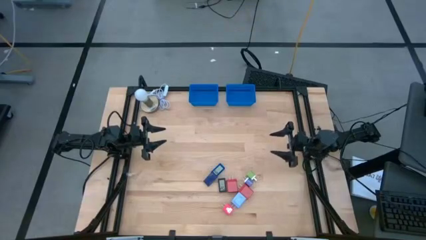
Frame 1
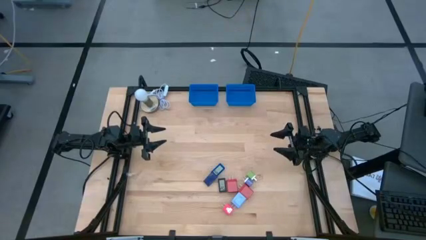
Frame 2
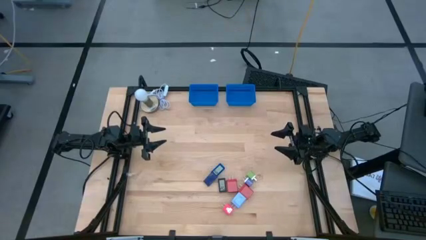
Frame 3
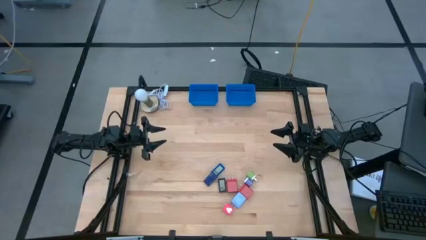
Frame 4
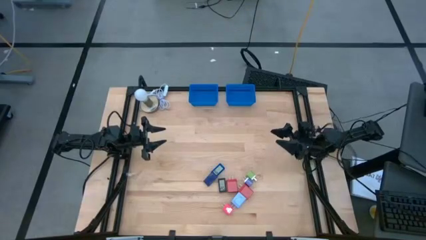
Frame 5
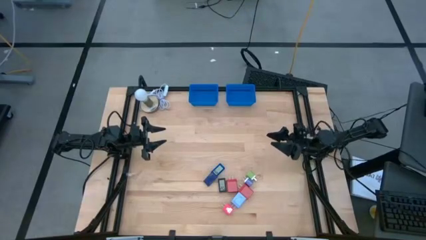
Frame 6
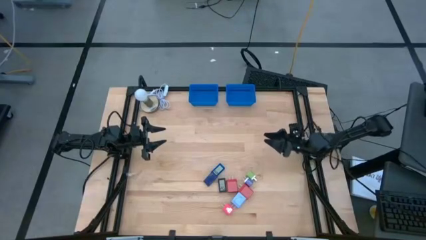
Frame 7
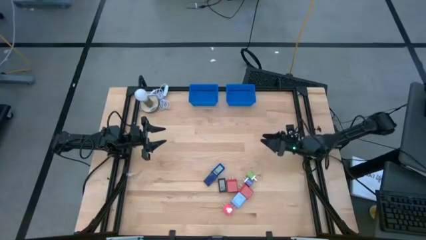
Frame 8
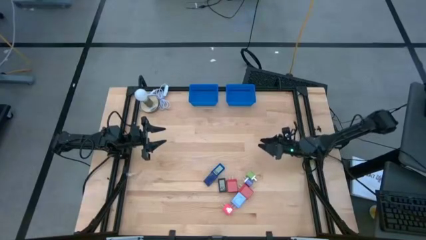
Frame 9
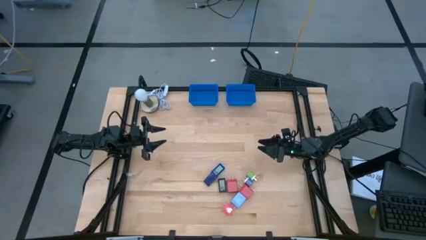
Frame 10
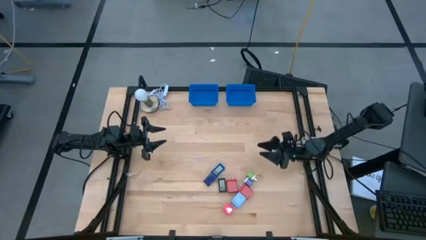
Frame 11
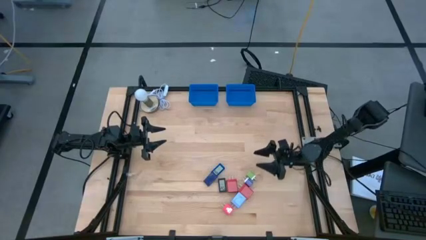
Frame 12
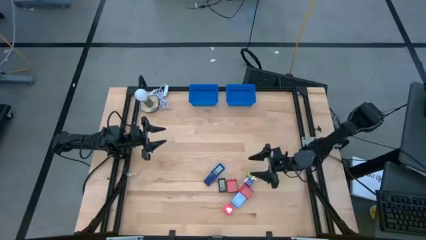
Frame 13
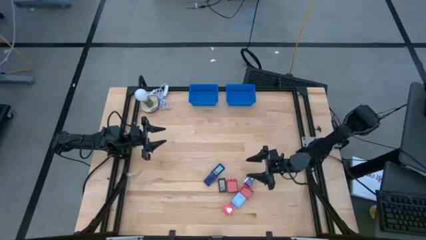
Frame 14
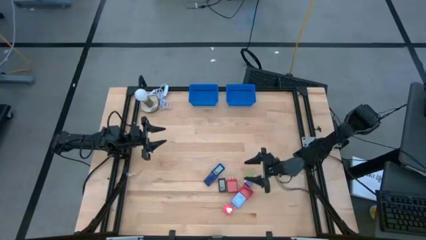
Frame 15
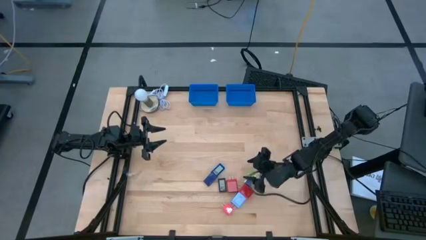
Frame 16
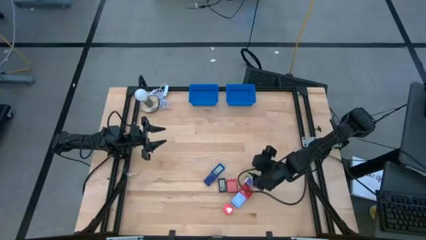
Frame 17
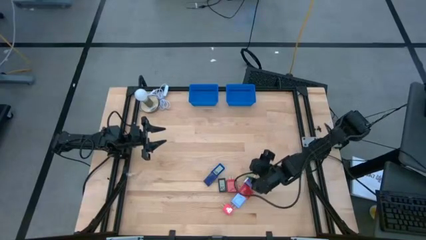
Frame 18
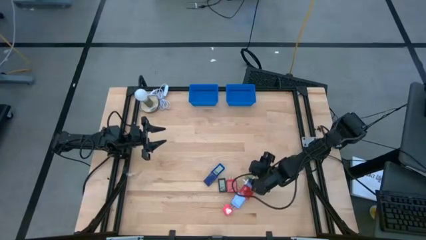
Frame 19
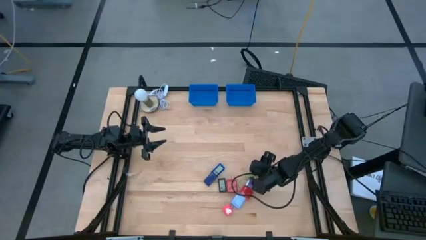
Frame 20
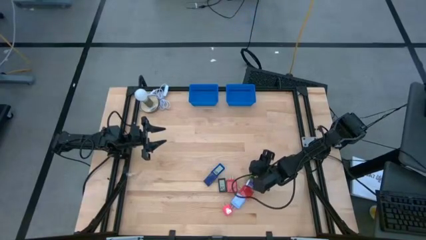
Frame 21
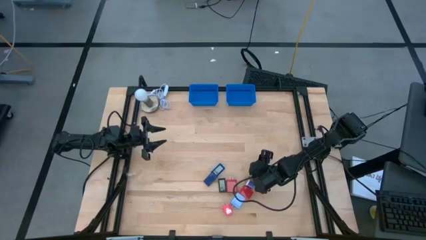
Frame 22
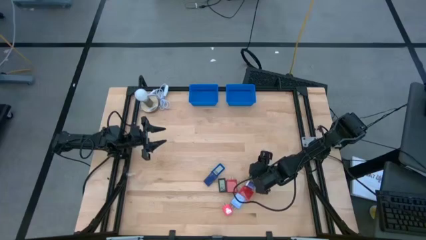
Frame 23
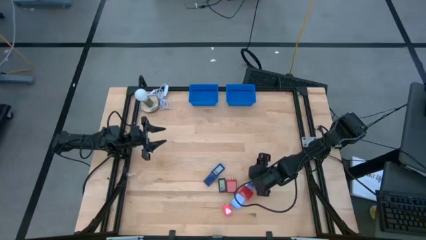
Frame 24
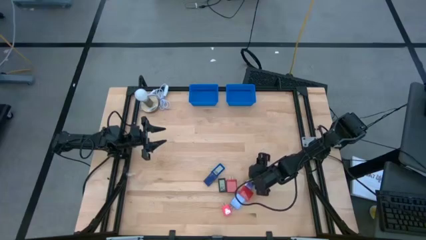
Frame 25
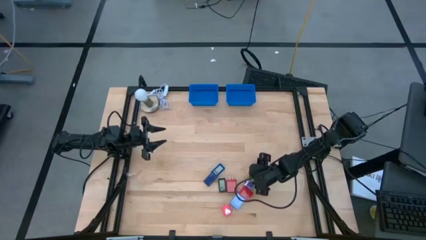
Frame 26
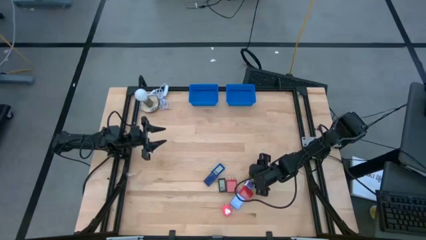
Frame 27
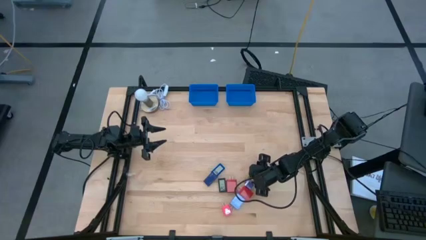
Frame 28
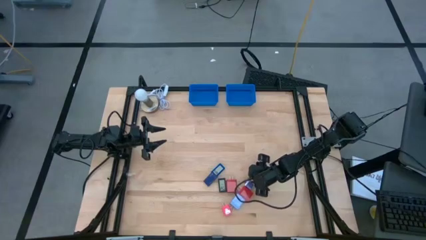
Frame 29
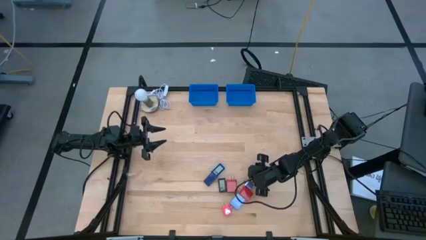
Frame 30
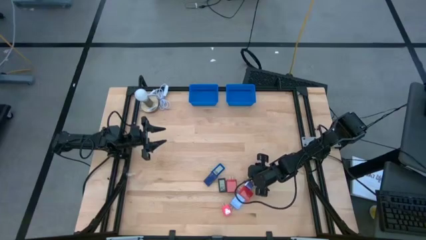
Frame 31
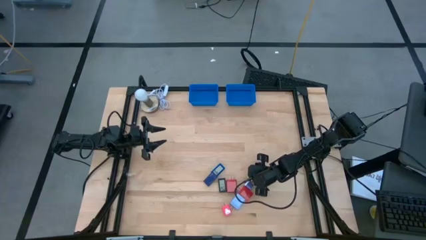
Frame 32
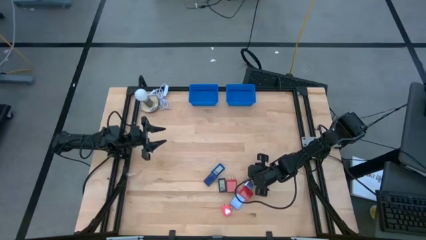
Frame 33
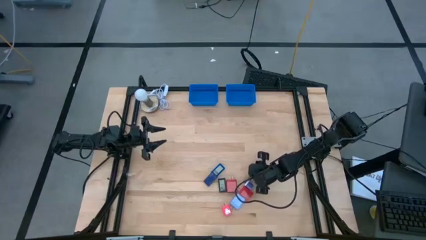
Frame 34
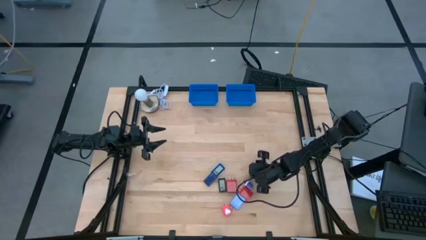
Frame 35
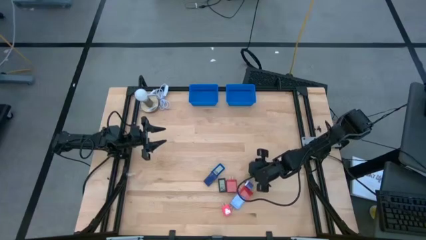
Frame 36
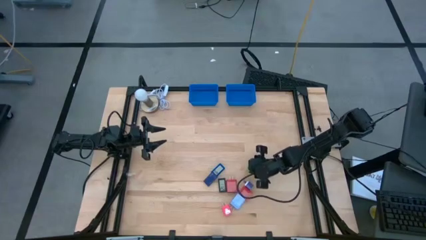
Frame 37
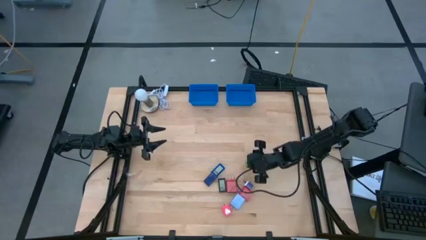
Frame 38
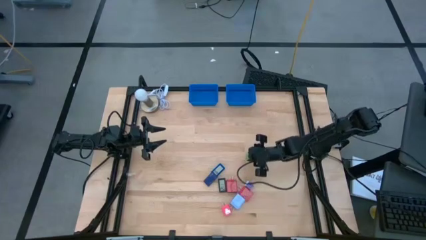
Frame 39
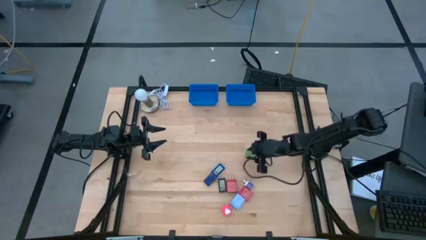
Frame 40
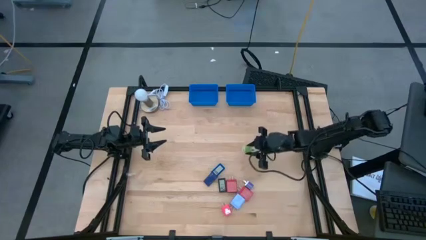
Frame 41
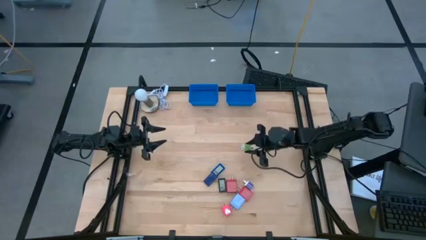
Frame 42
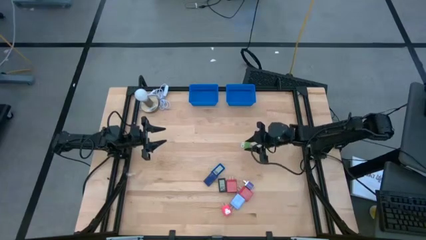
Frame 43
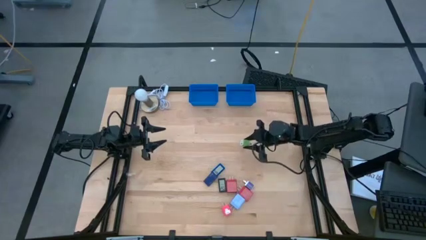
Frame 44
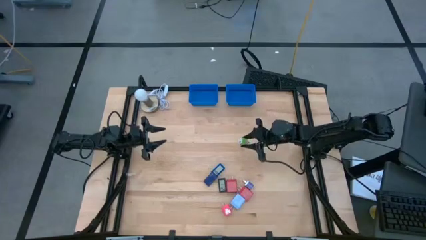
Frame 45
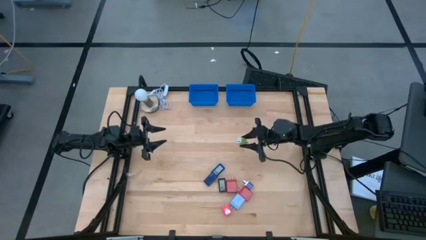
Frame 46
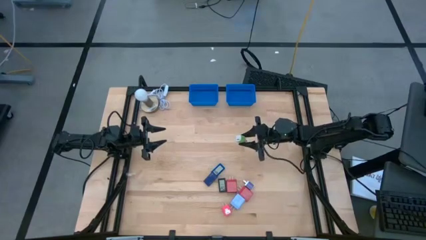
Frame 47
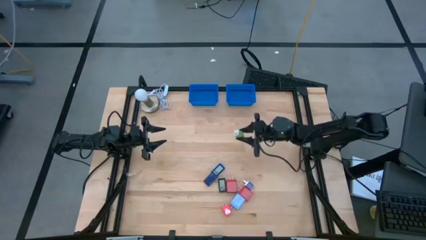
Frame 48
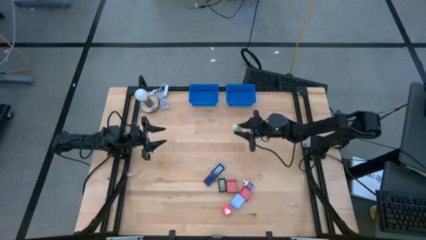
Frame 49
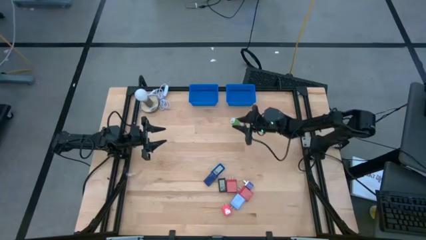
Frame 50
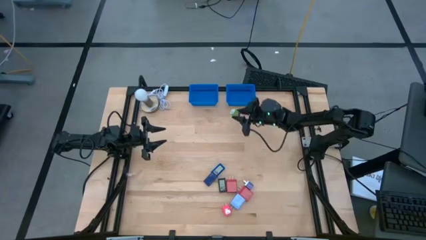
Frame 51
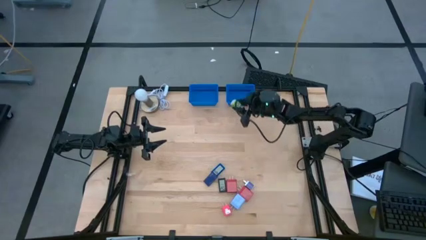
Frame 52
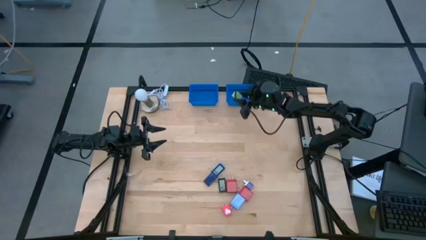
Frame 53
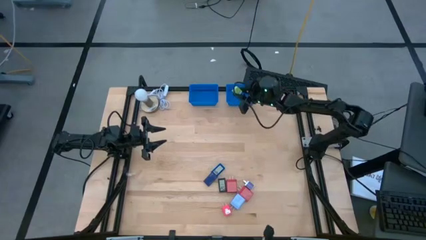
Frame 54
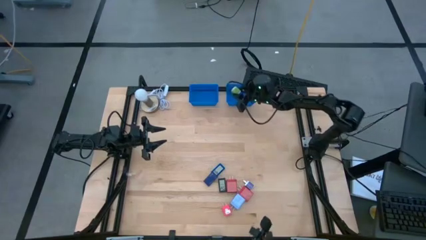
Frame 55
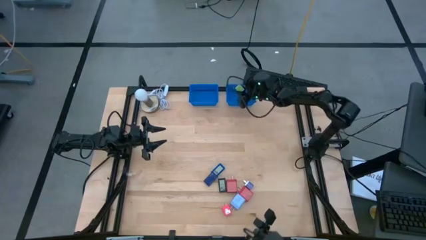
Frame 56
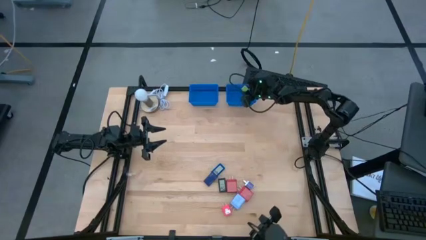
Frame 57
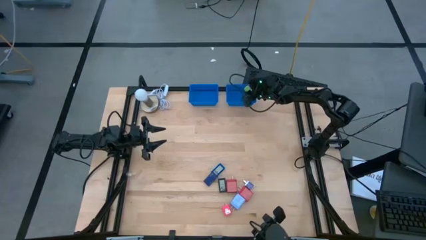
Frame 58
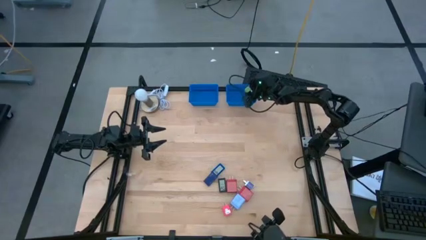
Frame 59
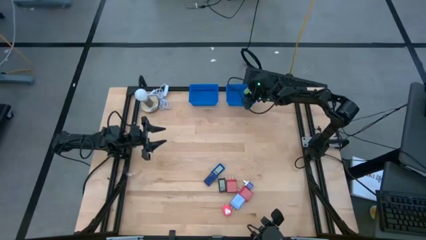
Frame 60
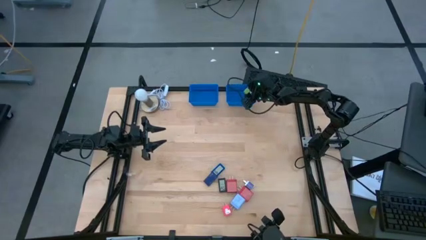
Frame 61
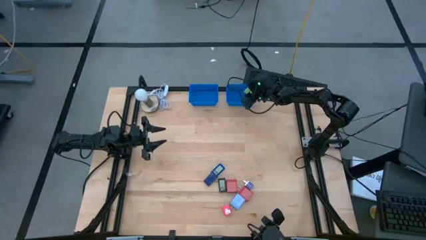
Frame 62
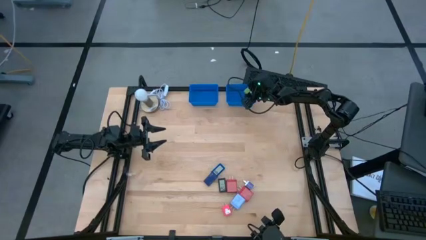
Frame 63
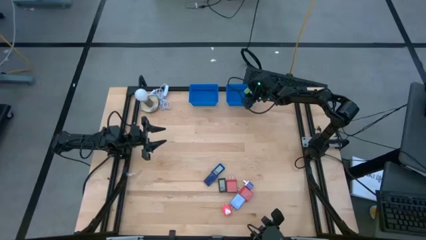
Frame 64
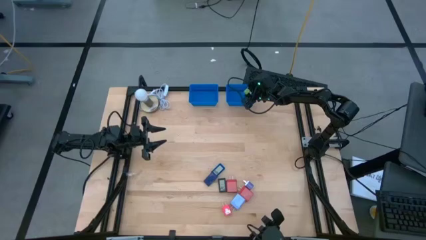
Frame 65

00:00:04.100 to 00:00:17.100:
Task: Pick & Place Office items
Put the green charger adapter into the right blue bin
